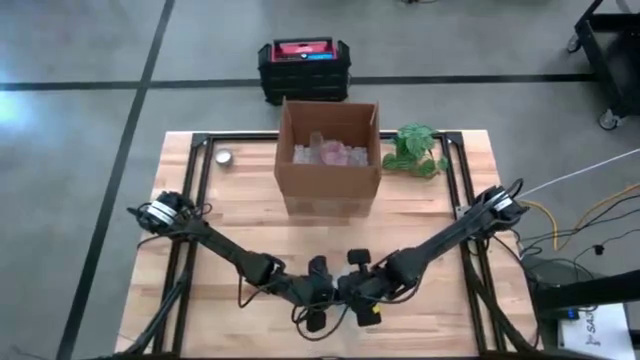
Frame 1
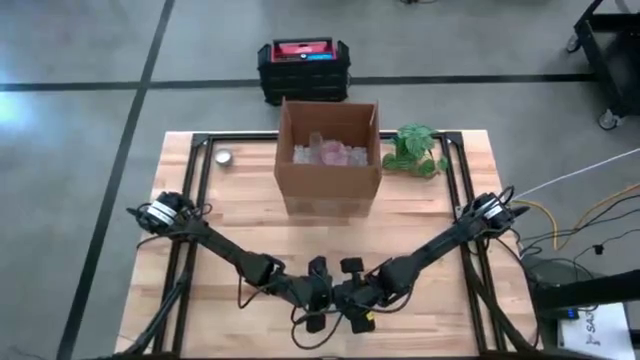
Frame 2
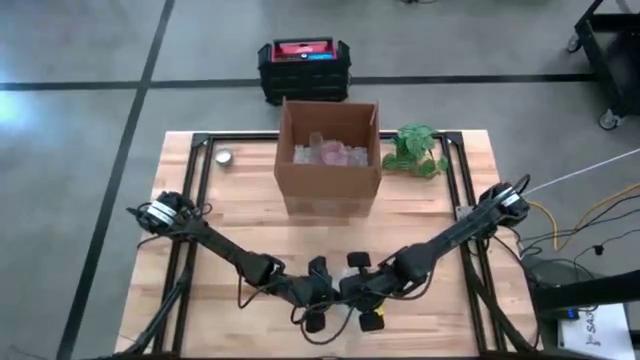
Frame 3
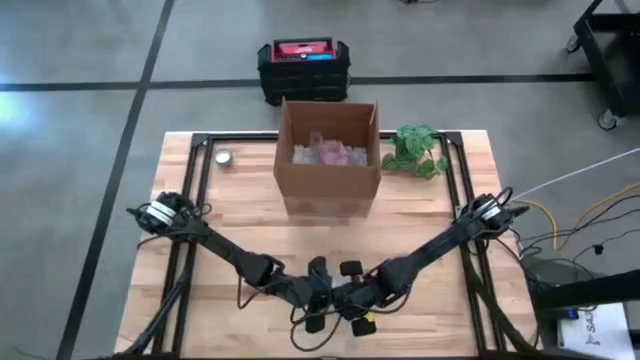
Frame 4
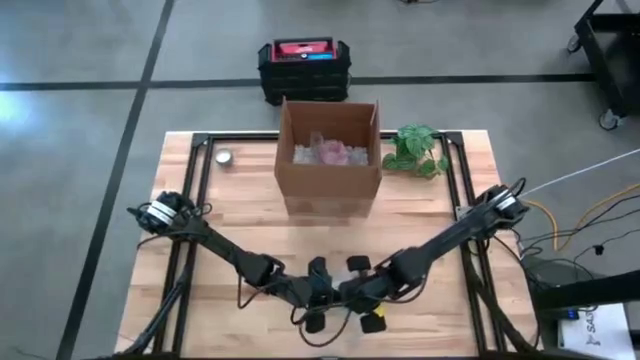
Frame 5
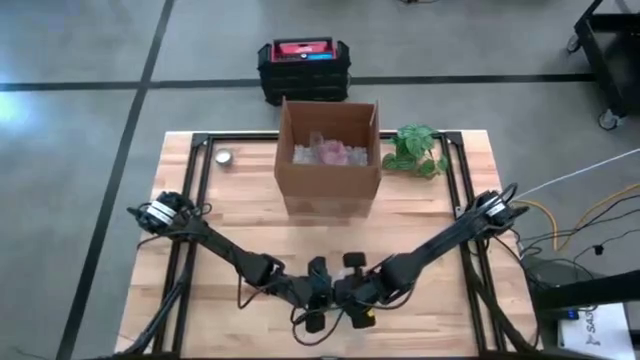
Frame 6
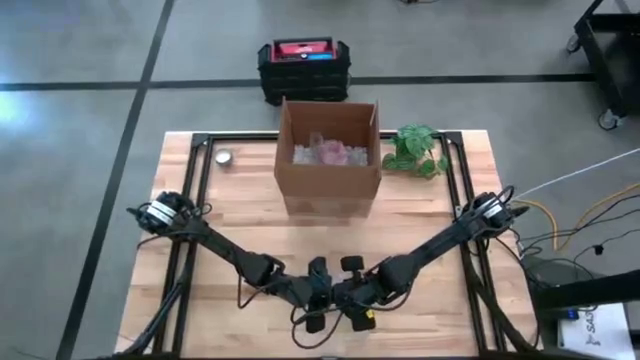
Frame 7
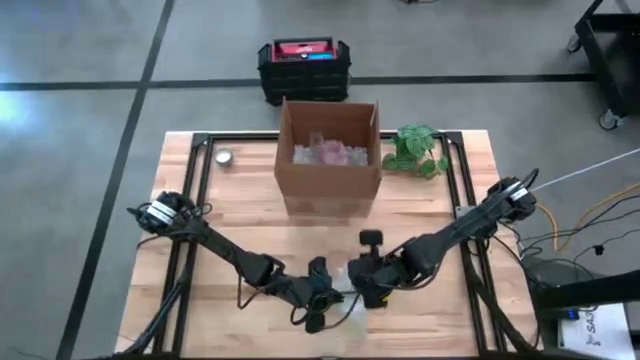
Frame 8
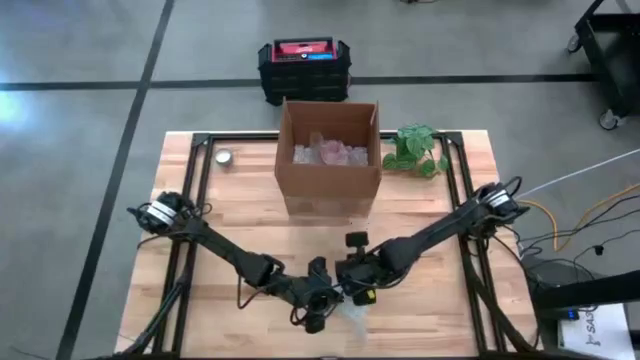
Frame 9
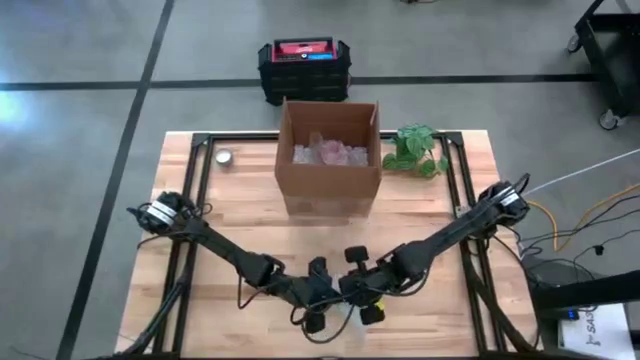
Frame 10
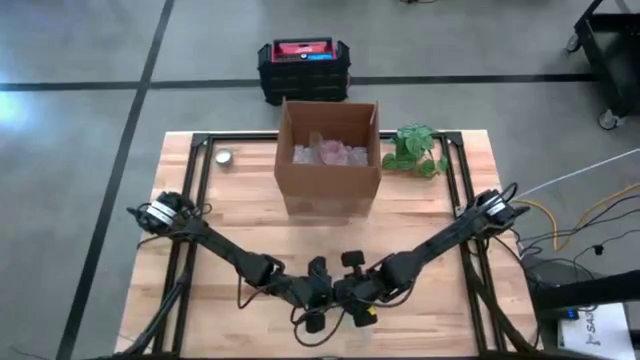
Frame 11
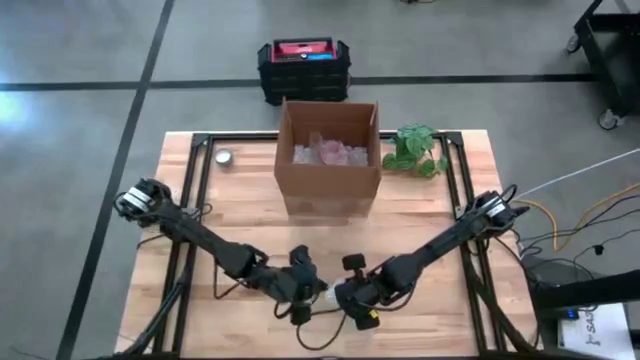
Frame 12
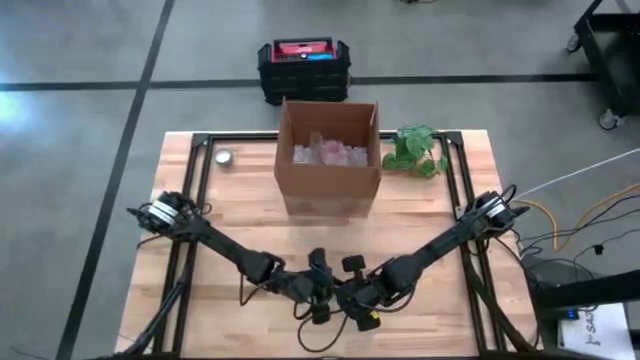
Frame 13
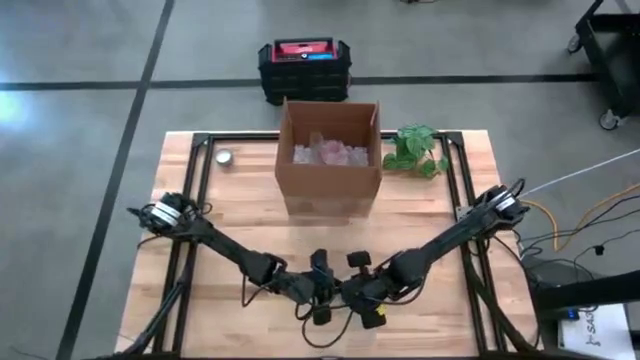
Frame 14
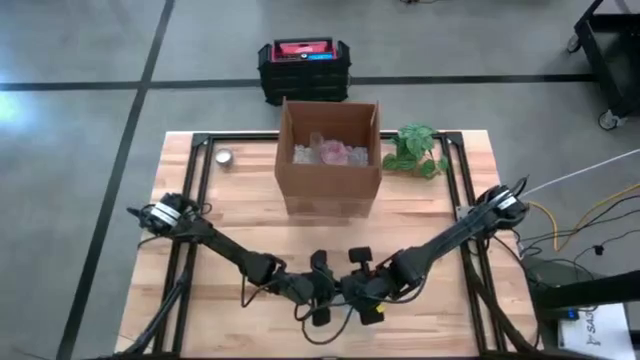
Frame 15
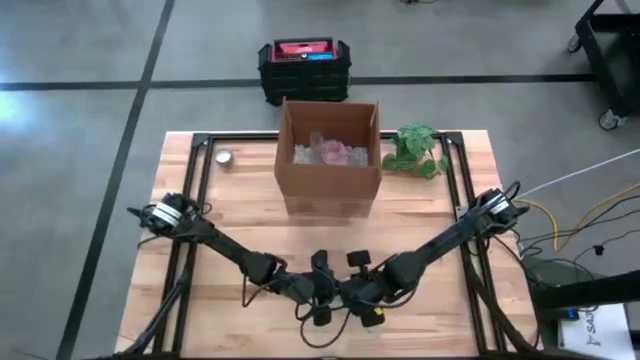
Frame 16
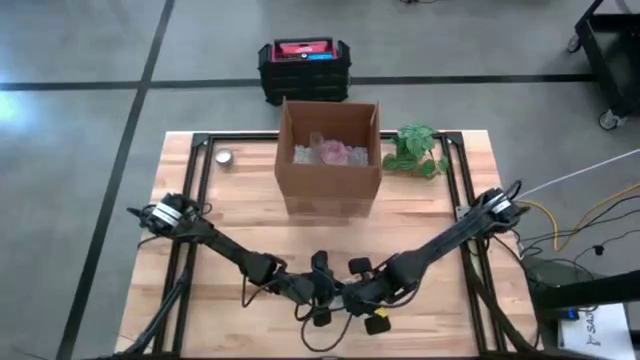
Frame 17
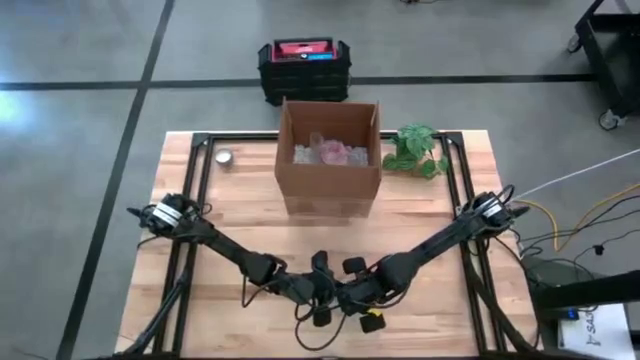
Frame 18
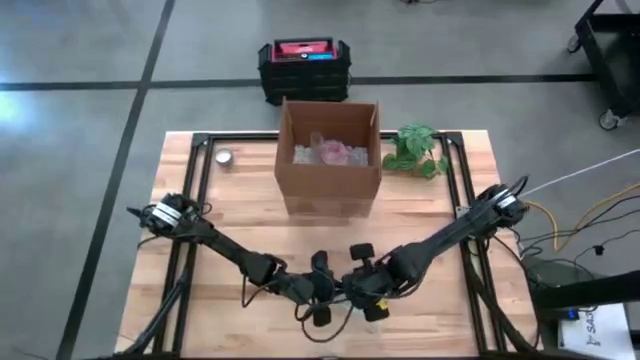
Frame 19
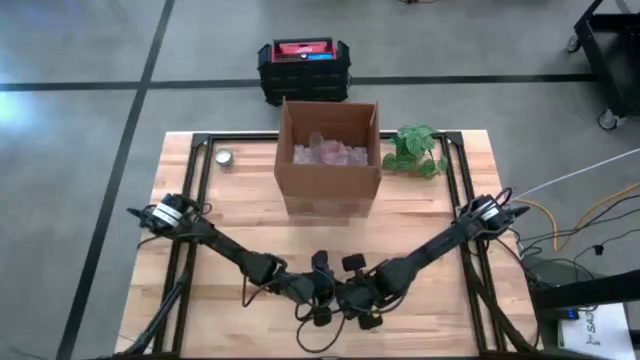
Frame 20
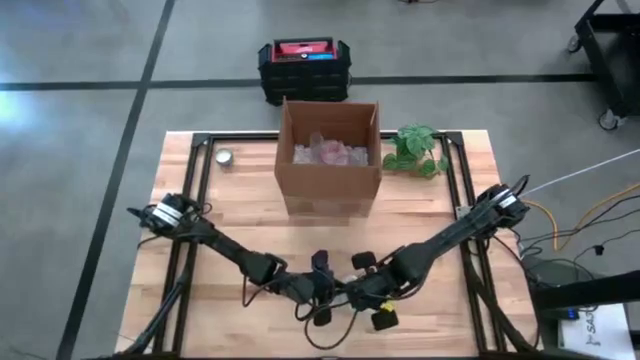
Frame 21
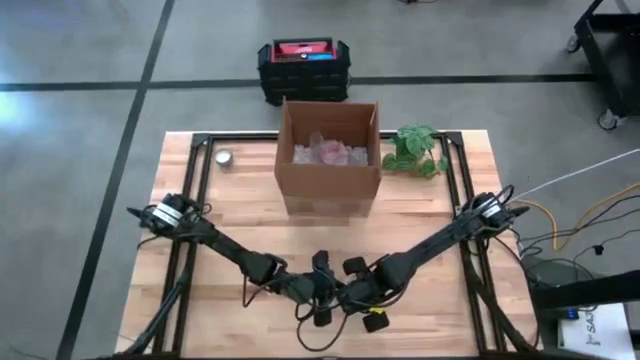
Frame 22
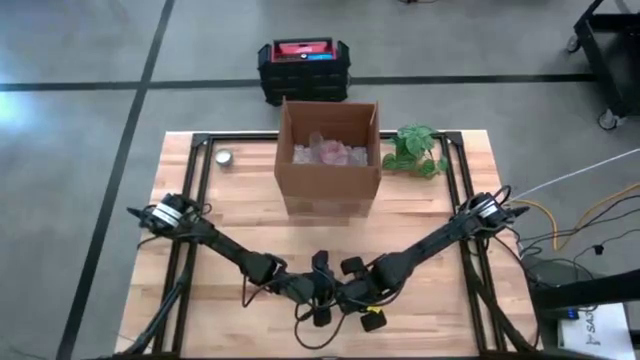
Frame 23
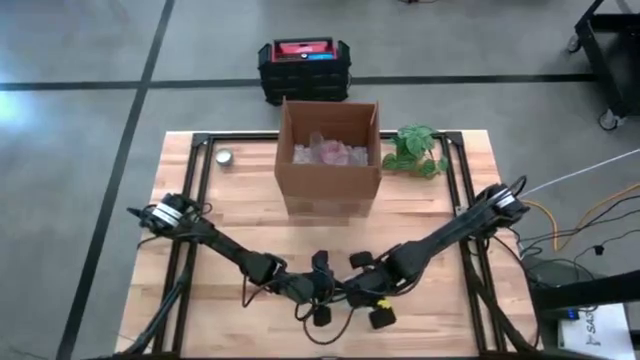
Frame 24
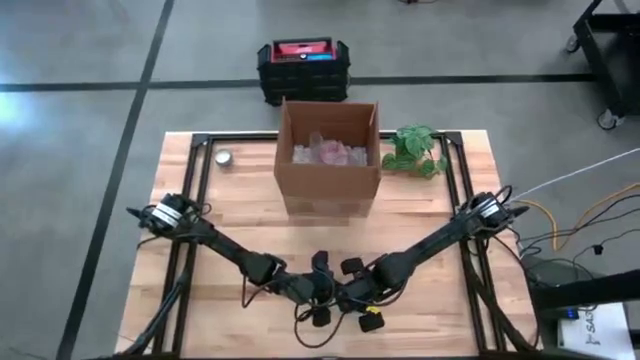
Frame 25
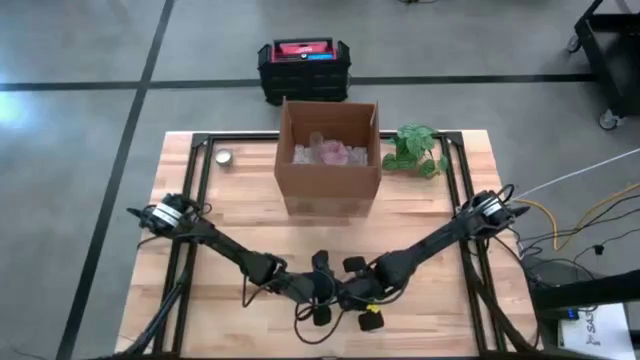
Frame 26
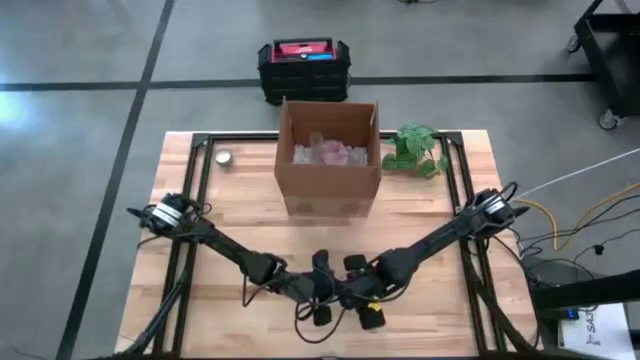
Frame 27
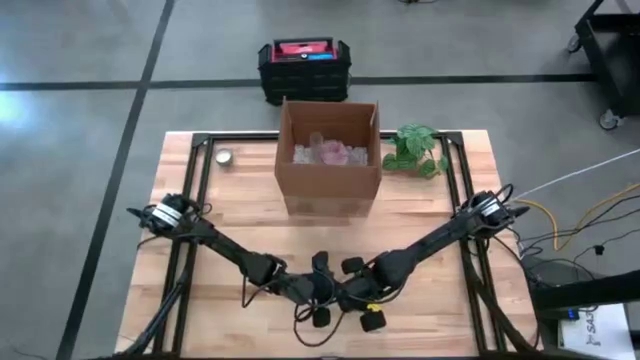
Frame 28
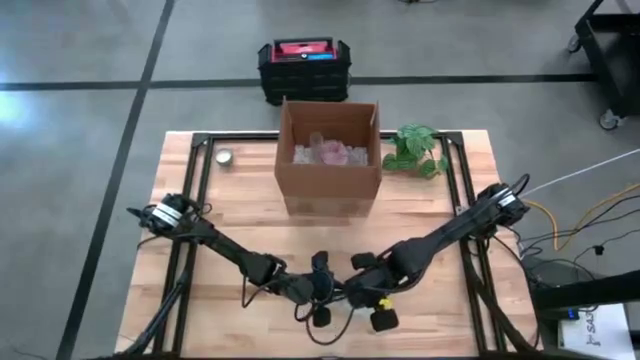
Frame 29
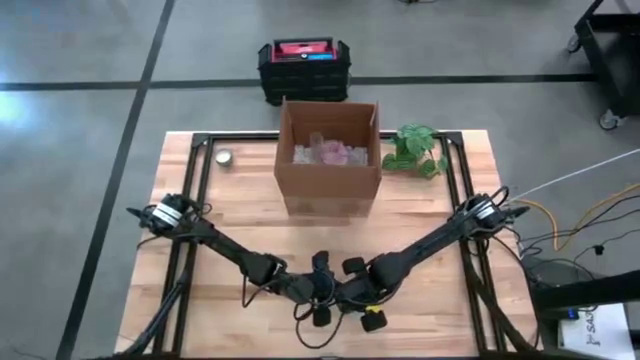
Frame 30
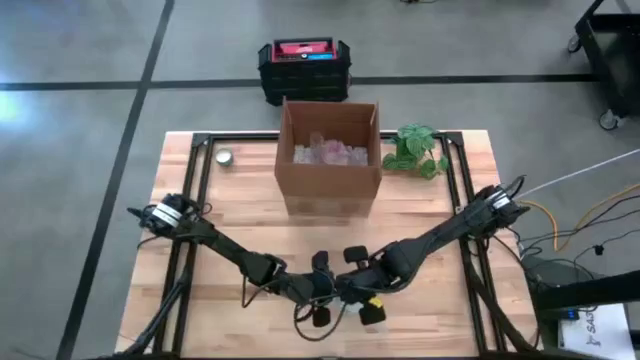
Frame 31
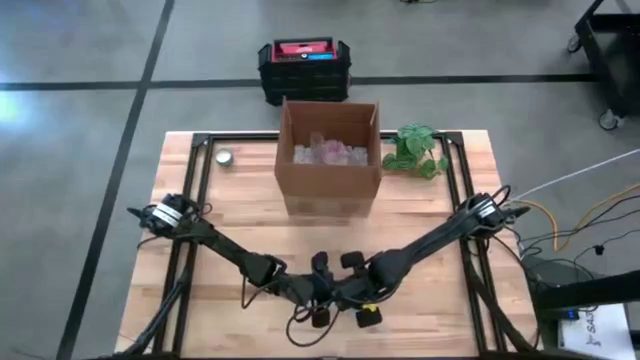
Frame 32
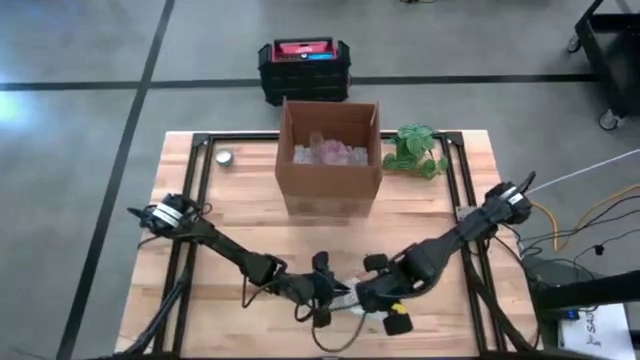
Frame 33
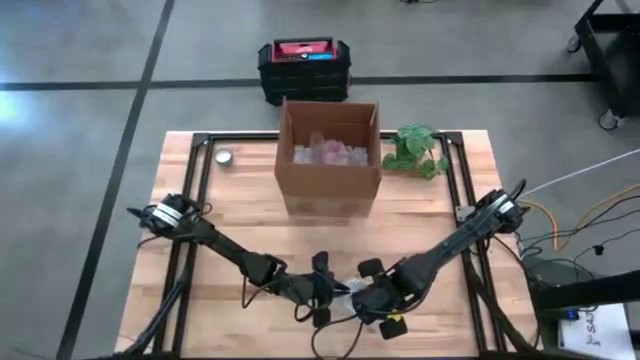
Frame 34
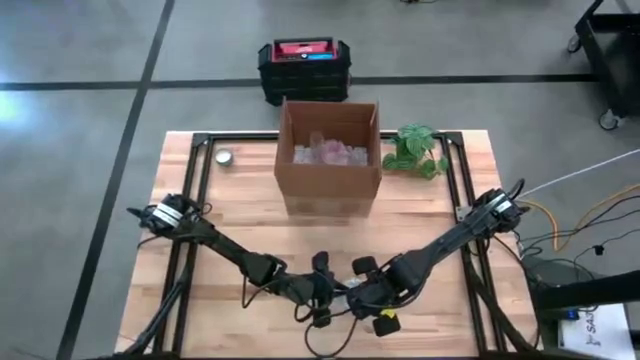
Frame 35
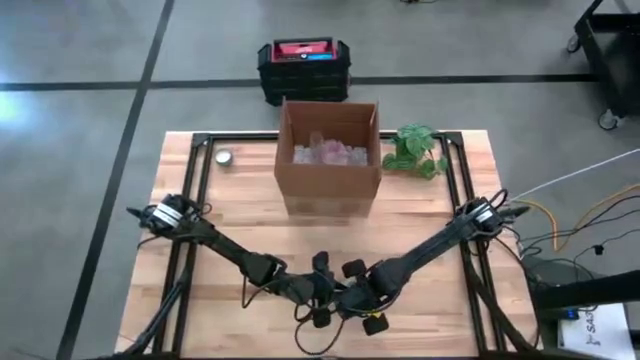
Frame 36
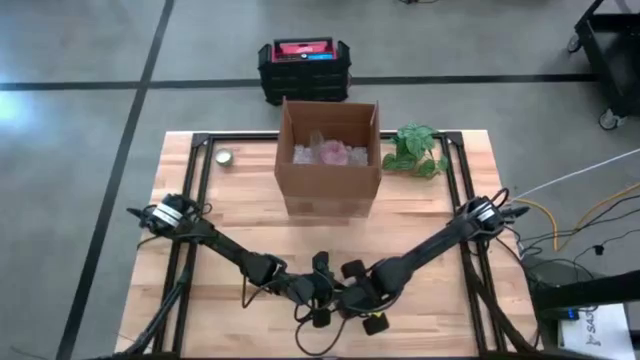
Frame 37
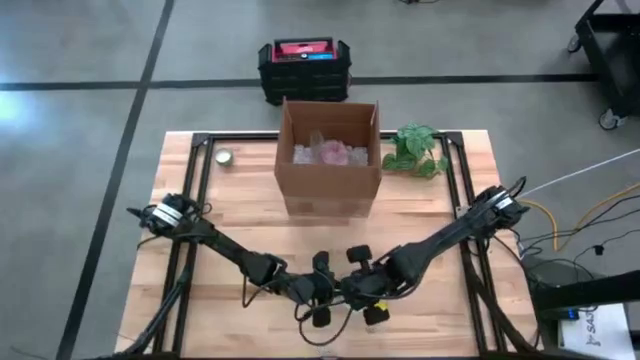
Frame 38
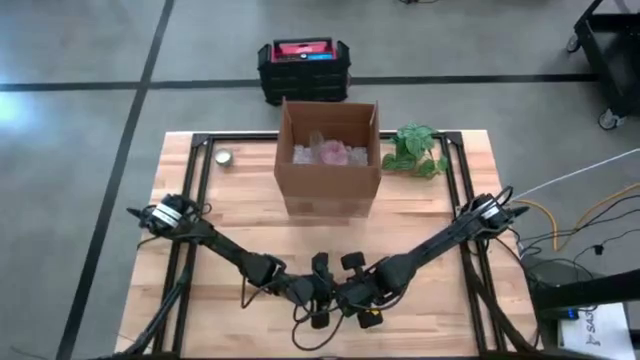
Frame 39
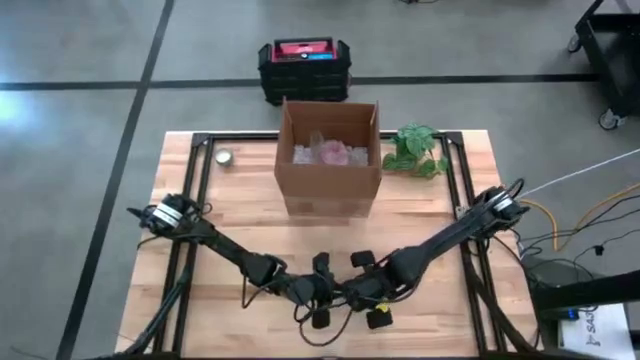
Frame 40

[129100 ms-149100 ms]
Task: wrap mug
Wrap the white mug in bubble wrap

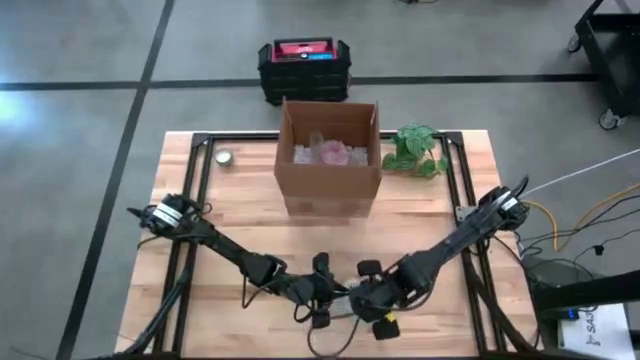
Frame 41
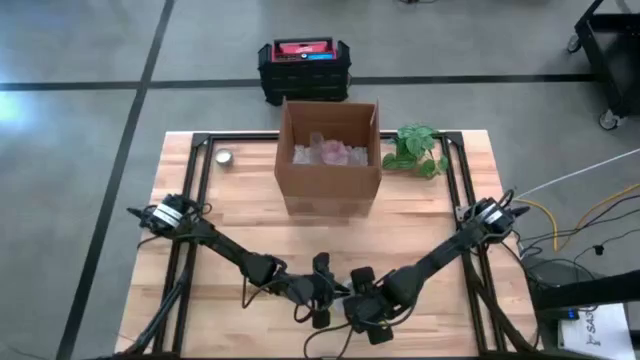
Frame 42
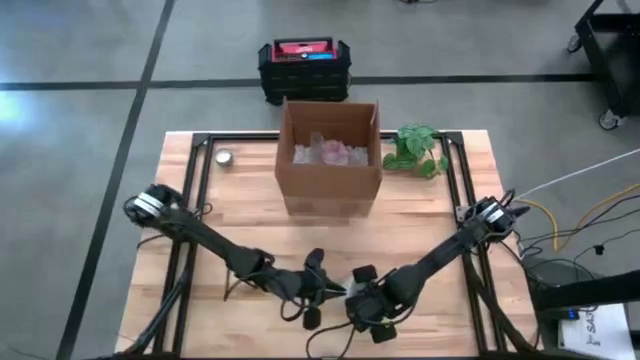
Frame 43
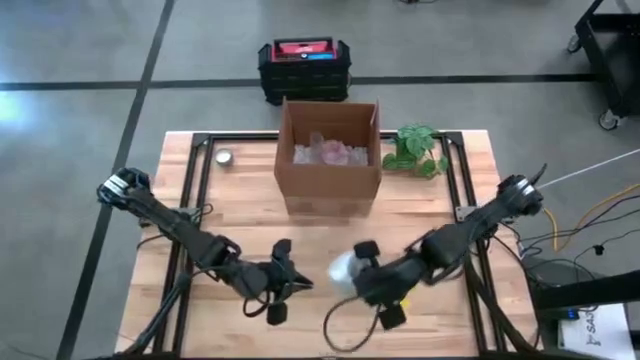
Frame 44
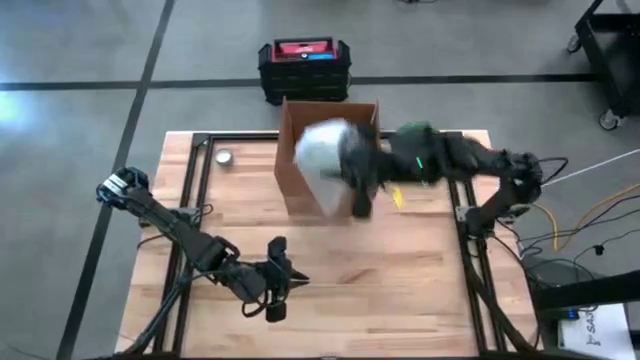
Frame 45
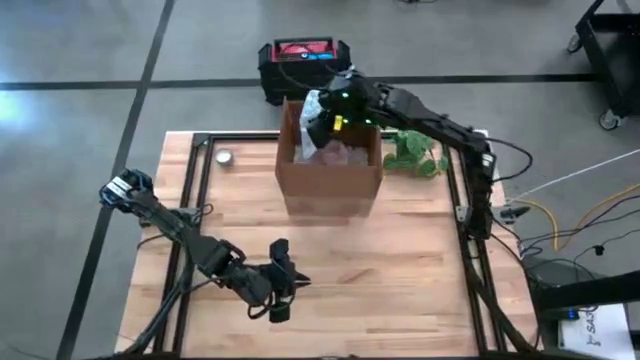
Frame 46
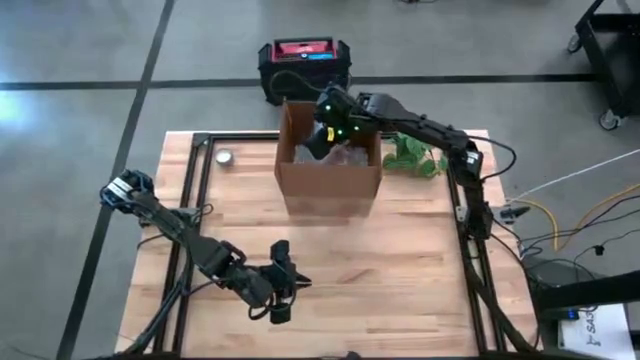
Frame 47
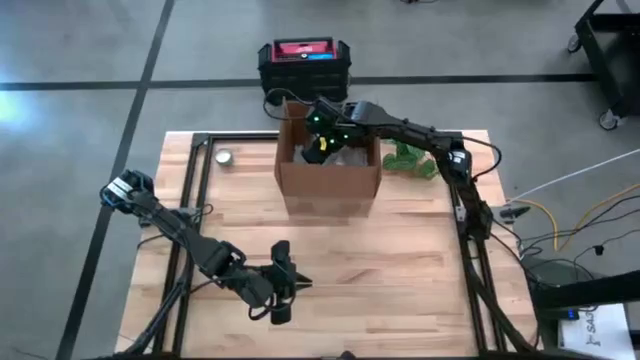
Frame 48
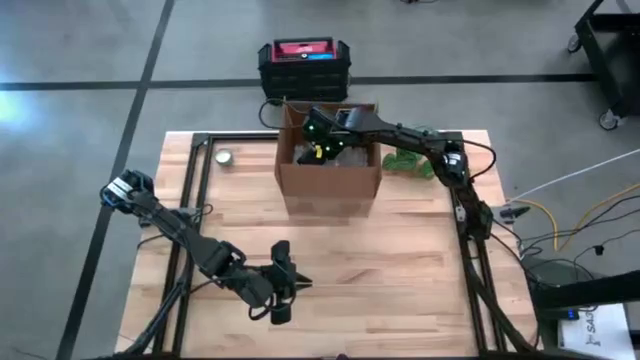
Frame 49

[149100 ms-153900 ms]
Put the wrapped white mug into the box
